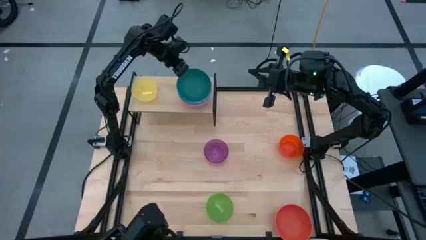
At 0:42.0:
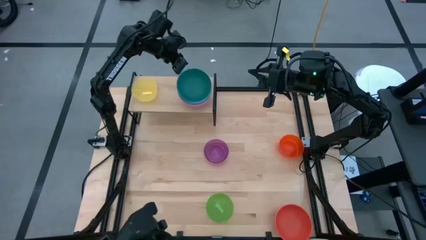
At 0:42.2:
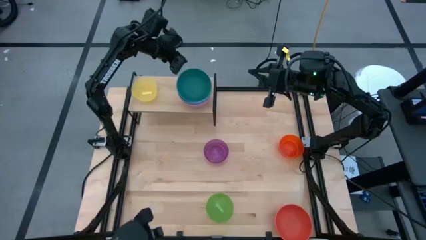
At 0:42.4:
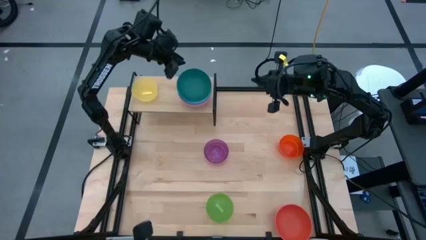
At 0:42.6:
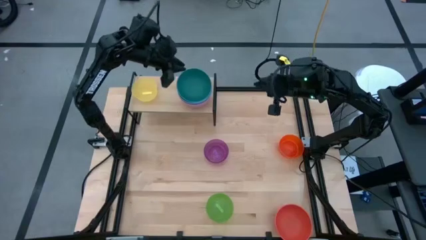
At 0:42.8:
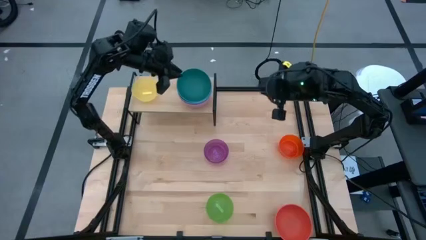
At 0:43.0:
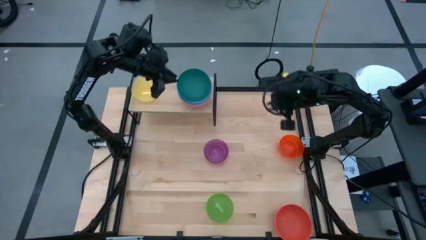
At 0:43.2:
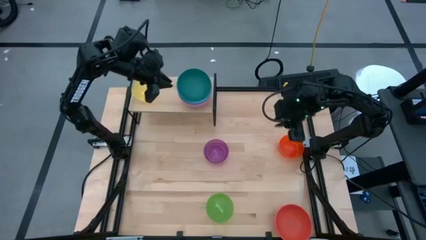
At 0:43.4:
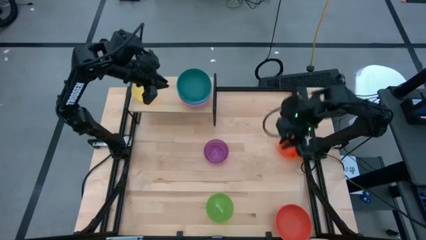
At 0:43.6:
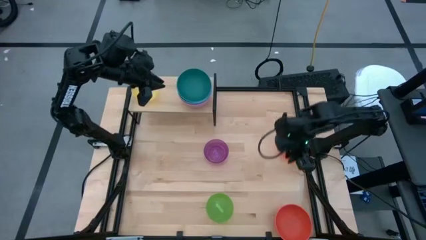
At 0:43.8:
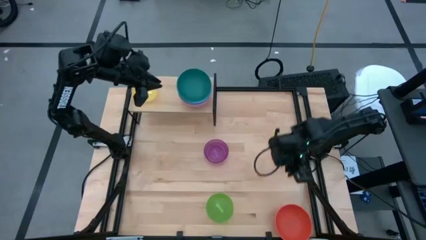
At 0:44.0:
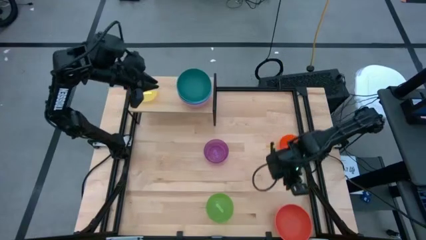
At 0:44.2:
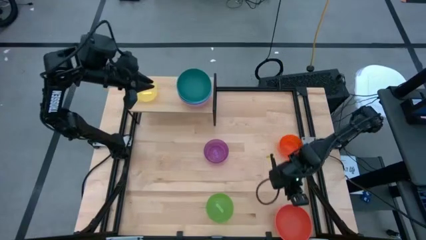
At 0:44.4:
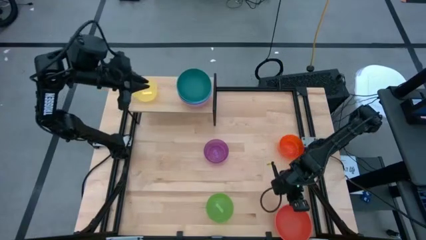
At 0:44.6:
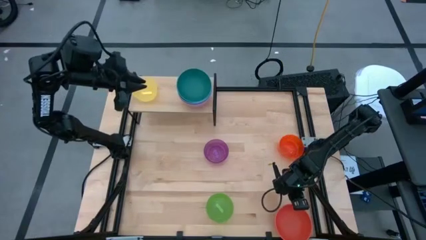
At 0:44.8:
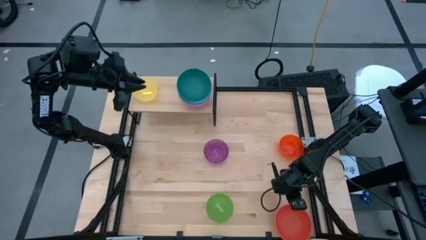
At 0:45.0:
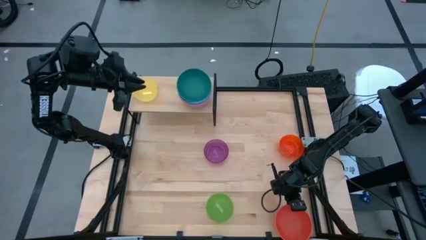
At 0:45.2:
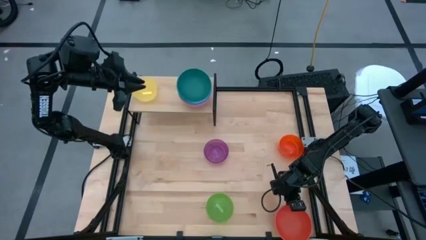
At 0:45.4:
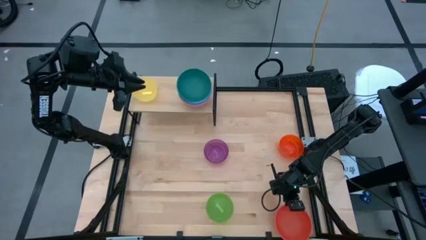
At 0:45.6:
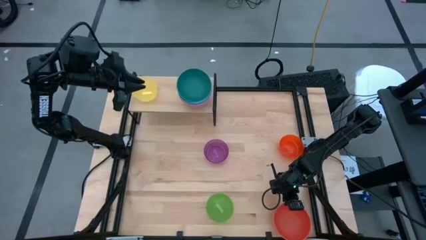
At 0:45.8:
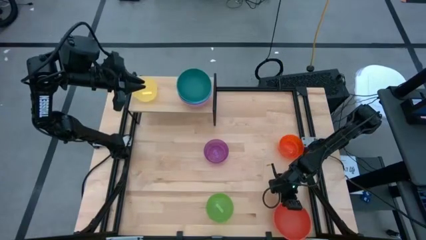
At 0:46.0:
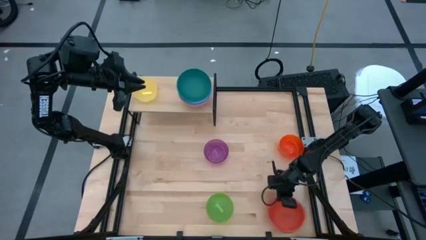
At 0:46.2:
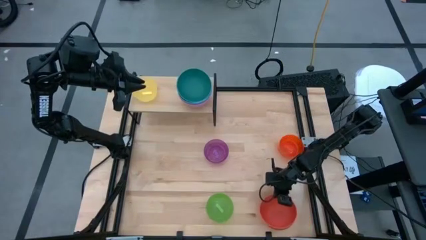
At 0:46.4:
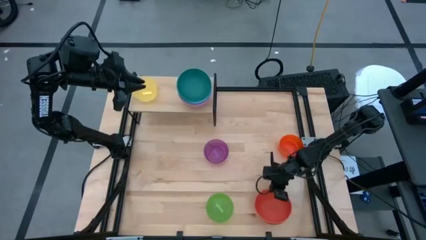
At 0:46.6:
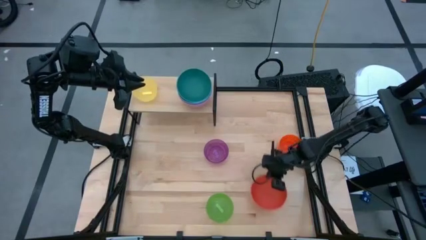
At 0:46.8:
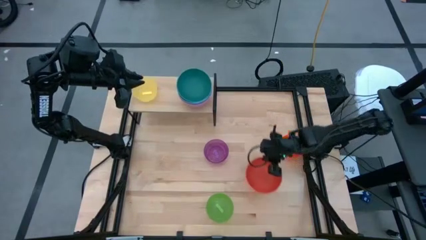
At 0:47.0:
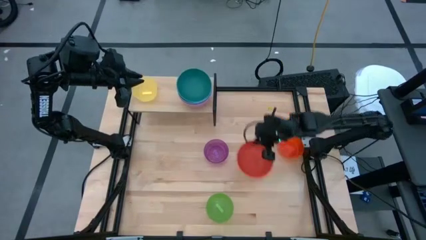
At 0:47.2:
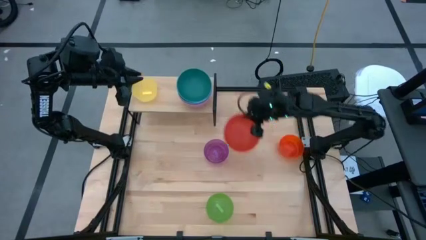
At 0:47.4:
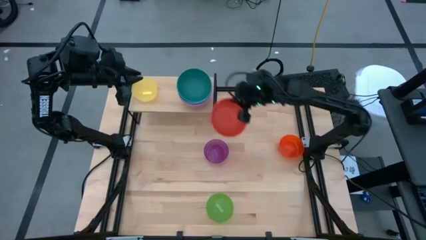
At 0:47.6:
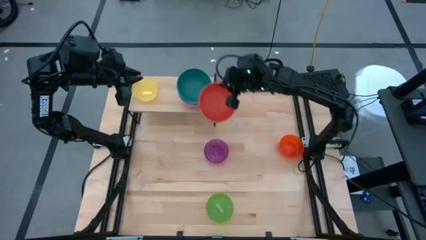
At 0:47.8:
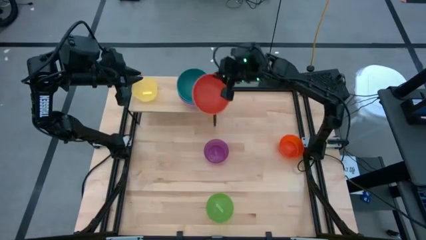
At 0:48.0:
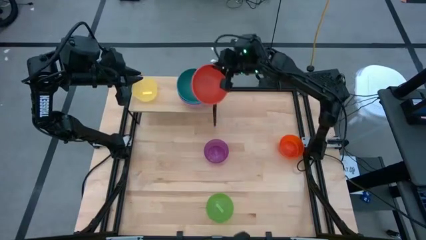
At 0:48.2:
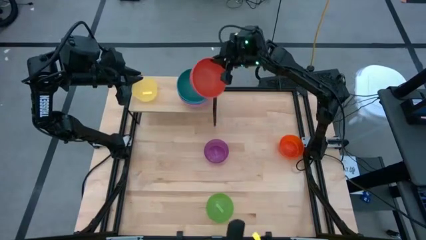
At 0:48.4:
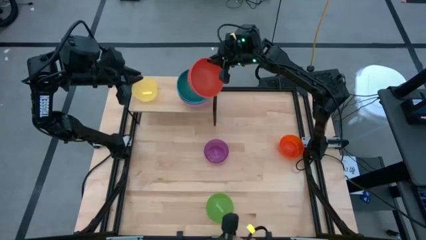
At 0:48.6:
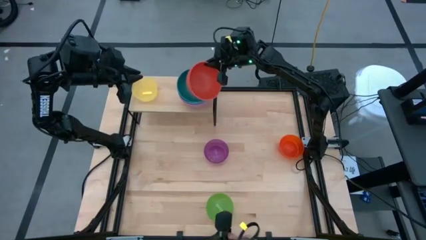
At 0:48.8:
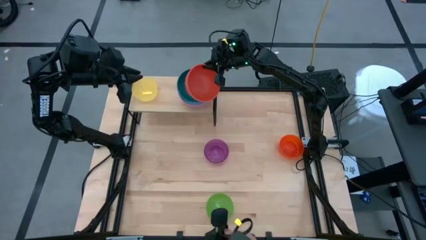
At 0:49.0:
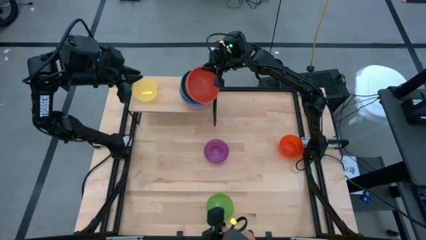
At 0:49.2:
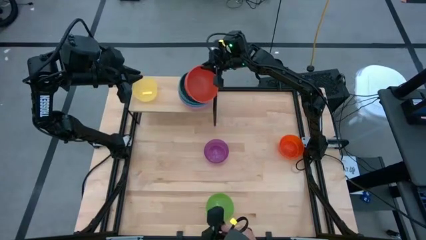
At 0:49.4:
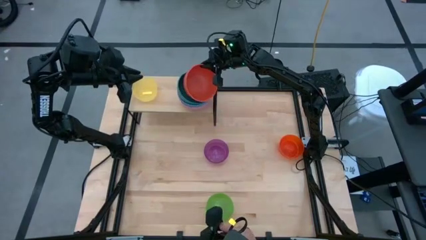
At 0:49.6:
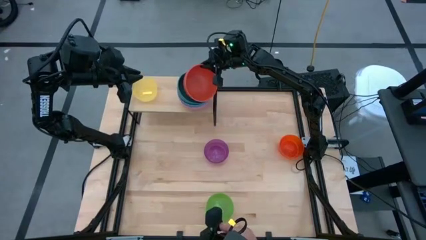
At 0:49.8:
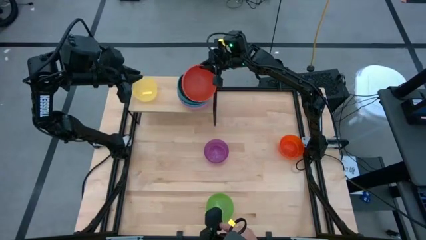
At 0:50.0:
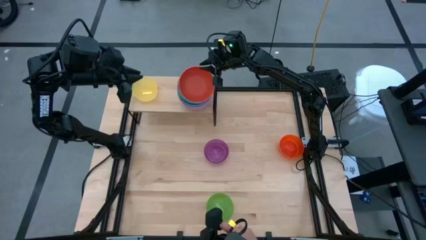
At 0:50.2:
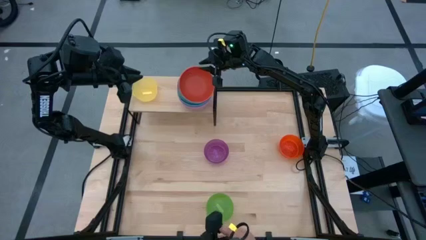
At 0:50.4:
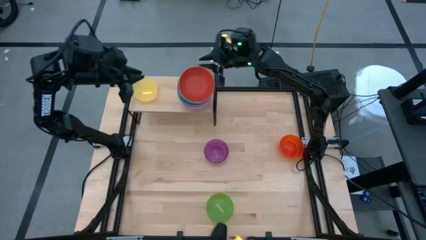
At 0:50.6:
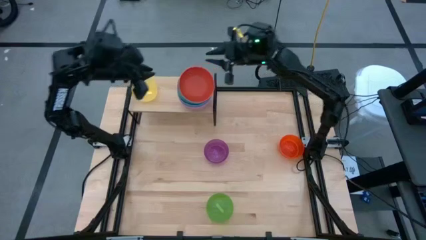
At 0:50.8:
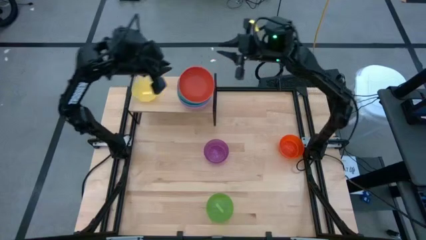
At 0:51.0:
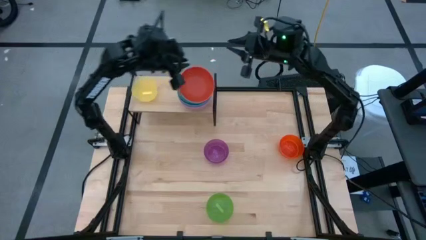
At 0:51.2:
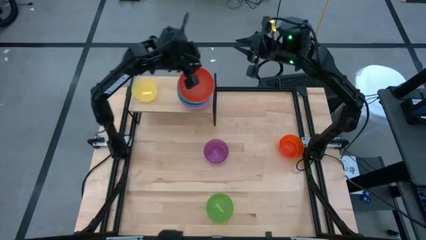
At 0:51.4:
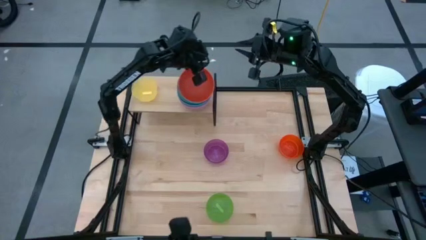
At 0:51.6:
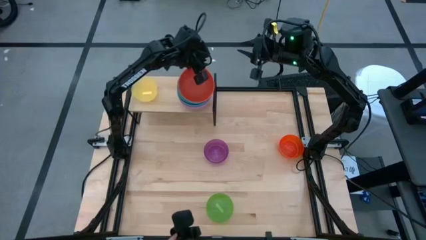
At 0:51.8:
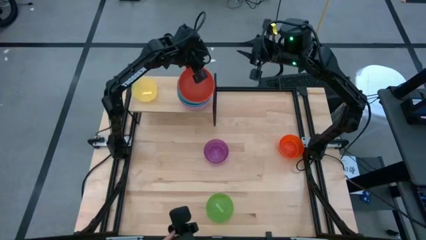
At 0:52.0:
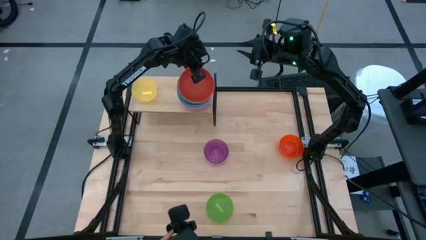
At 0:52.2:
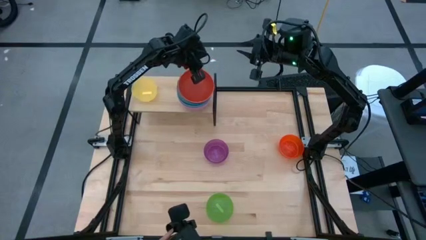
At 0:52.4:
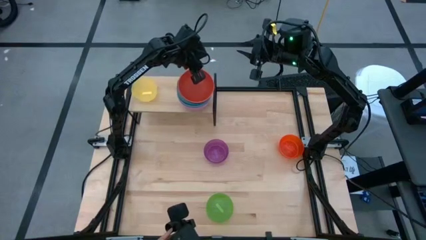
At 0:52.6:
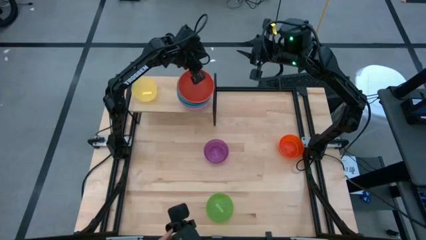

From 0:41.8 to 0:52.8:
Task: Place and stack bowls onto a shelf
Stack the orange bowl on the green bowl on the shelf

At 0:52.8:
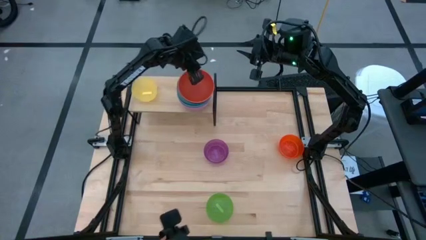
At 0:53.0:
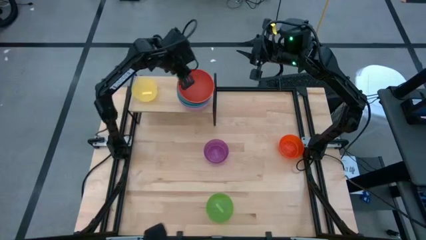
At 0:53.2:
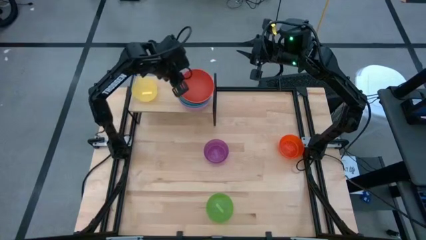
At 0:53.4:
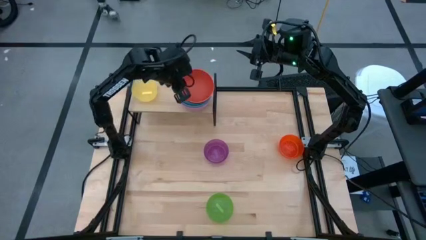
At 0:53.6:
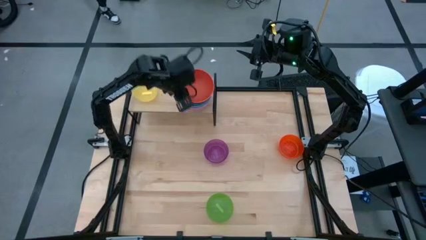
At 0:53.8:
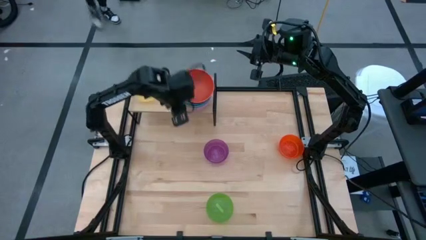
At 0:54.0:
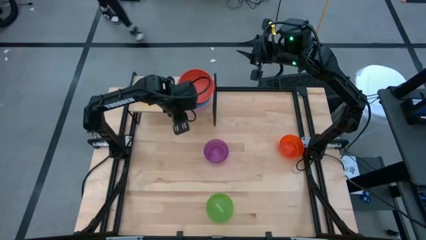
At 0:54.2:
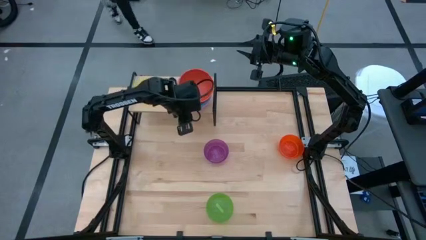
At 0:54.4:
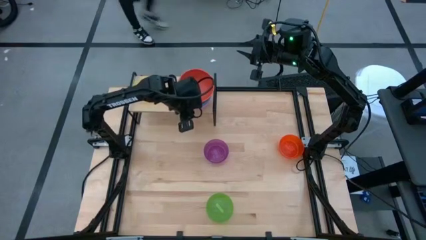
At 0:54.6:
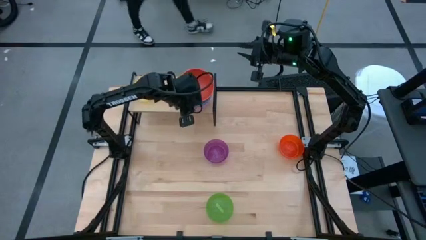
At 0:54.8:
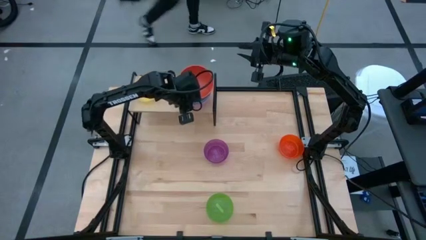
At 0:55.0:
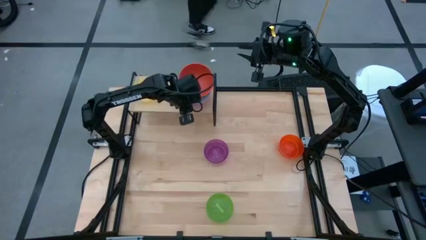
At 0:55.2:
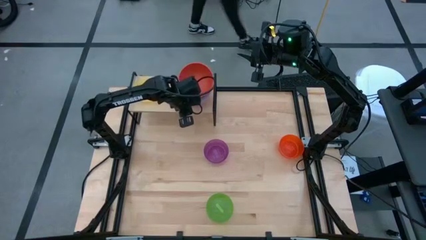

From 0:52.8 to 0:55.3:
Adjust the bowls on the shelf

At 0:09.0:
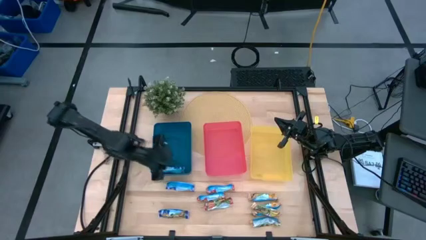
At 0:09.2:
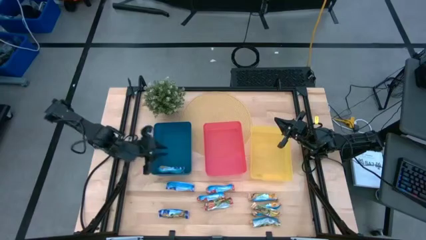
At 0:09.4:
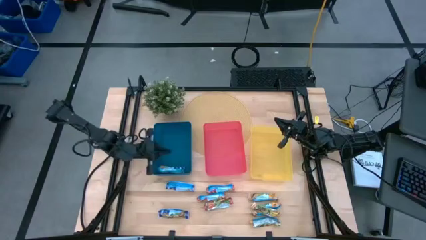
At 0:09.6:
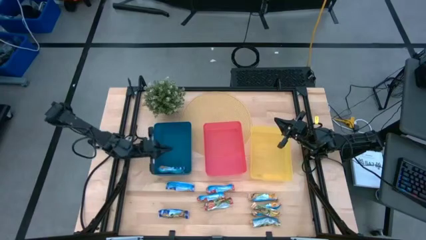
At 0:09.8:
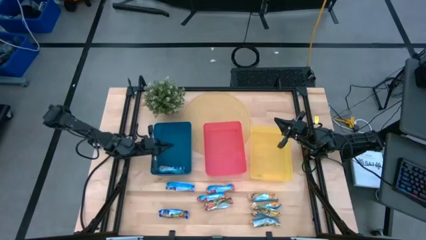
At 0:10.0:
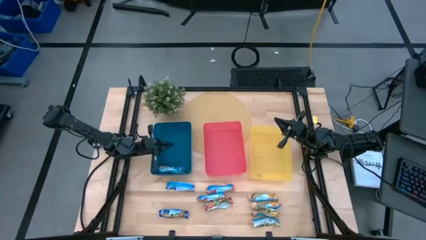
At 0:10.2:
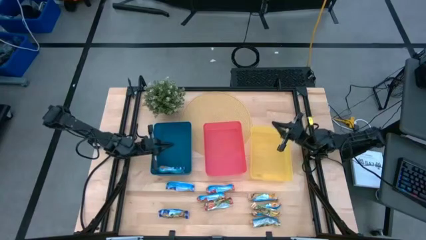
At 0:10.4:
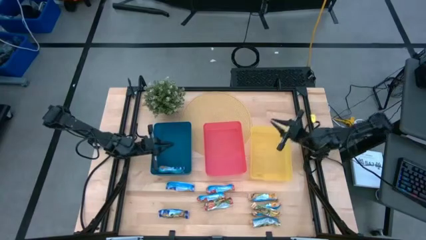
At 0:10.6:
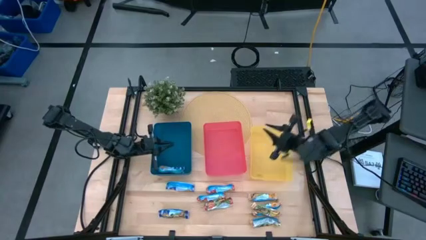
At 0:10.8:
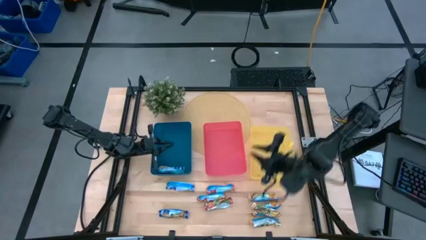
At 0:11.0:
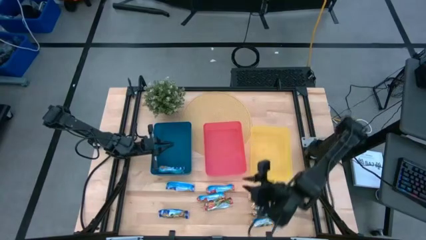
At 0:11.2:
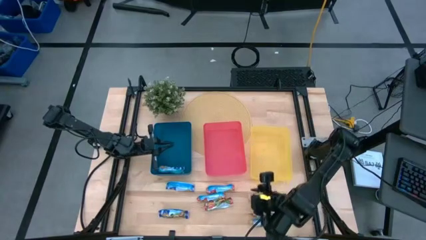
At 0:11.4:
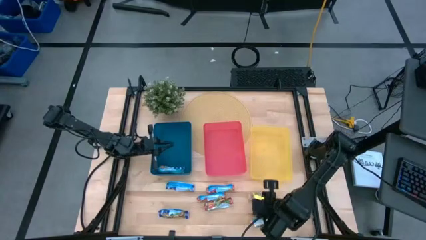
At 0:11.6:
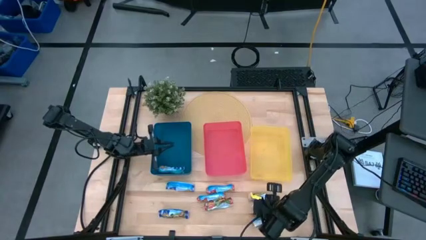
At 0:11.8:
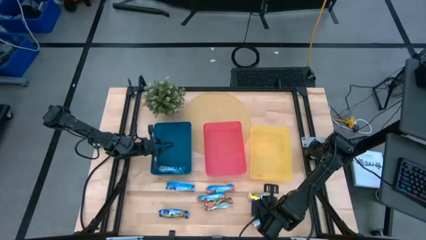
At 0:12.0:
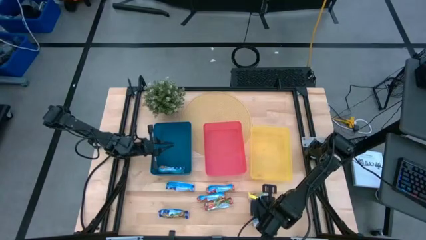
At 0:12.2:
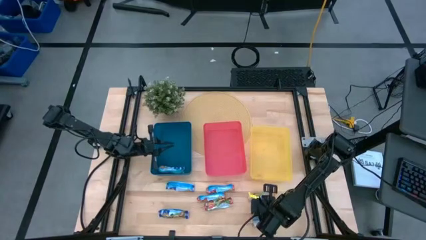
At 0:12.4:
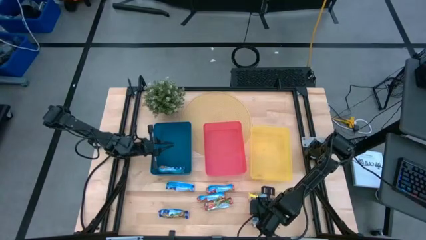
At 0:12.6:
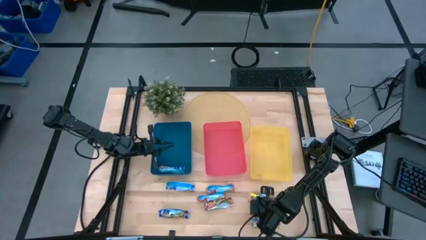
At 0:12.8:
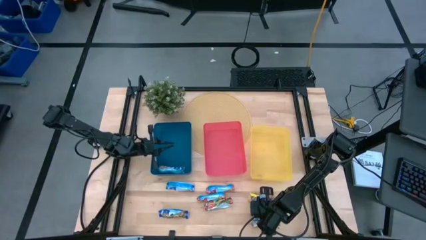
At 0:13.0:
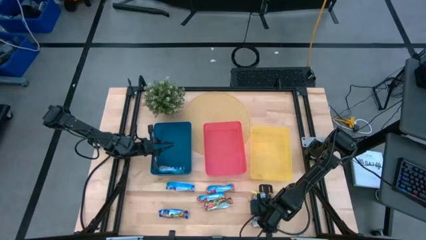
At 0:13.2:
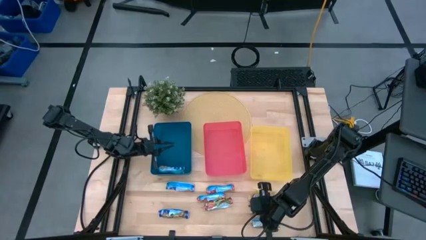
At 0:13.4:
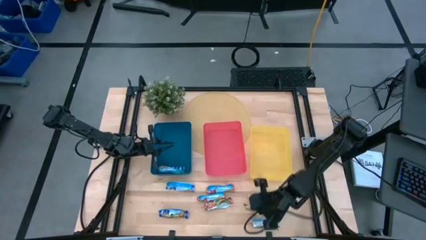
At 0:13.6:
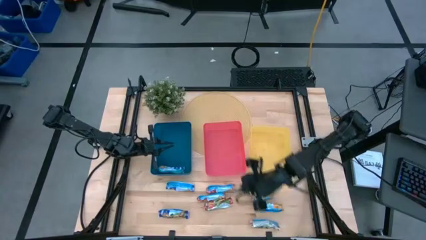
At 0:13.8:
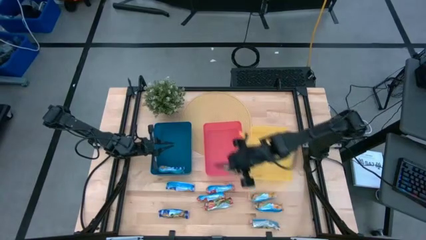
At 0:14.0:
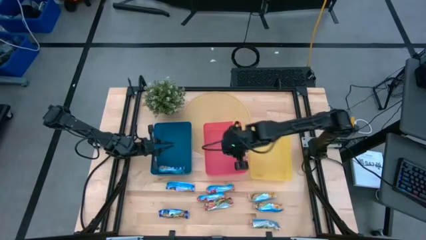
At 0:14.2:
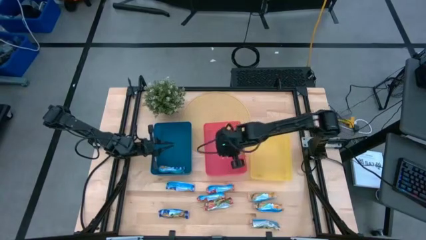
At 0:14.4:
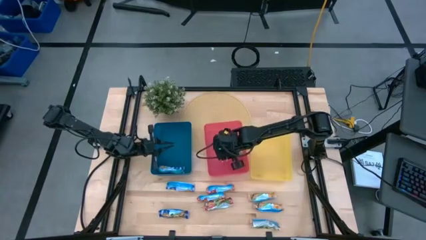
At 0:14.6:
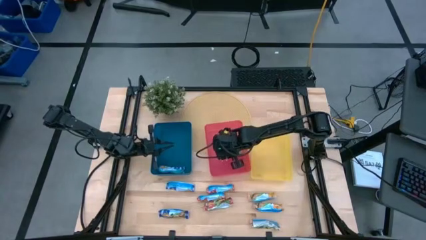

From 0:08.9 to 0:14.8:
Task: Pick and place Granola Bars by type
Put the yellow granola bar into the red bin
